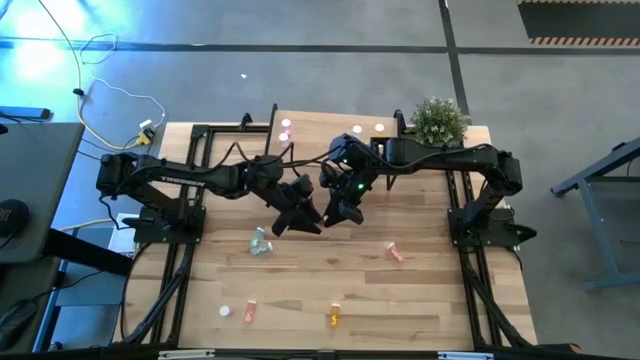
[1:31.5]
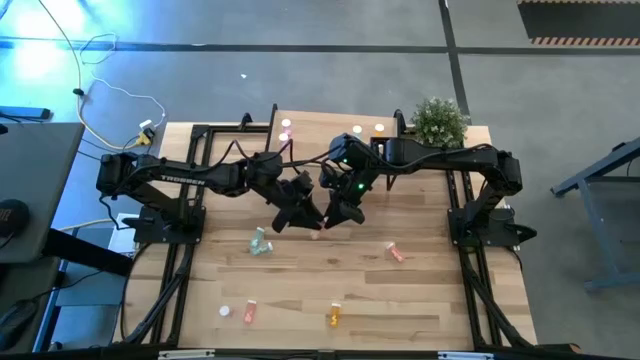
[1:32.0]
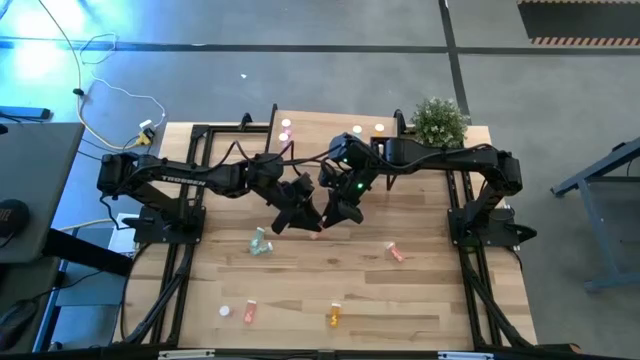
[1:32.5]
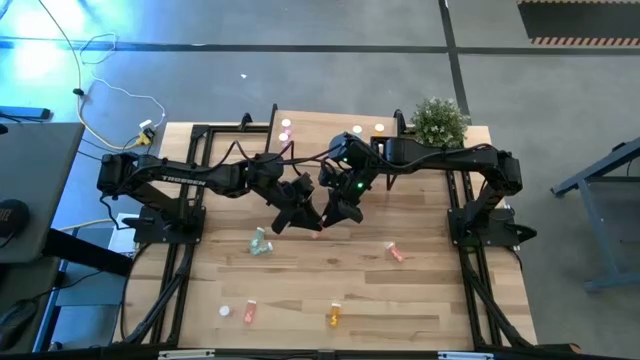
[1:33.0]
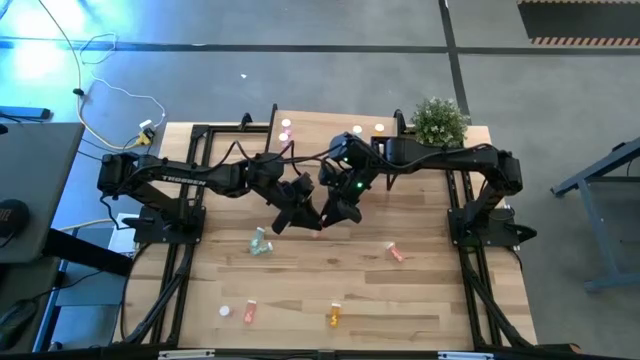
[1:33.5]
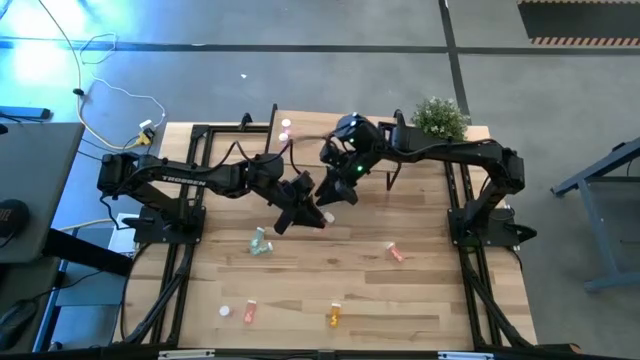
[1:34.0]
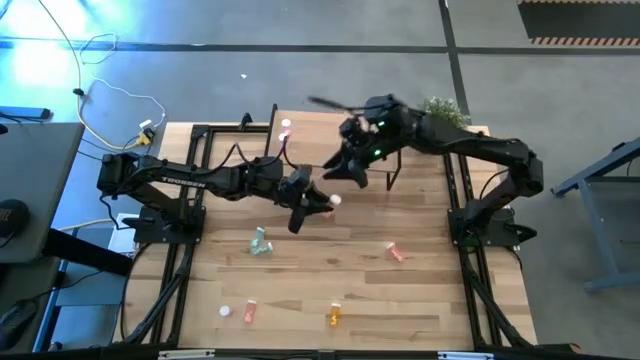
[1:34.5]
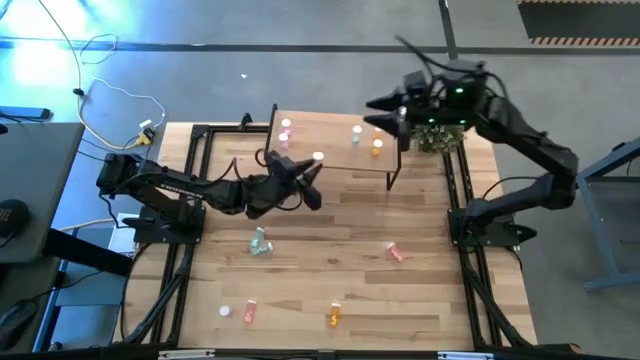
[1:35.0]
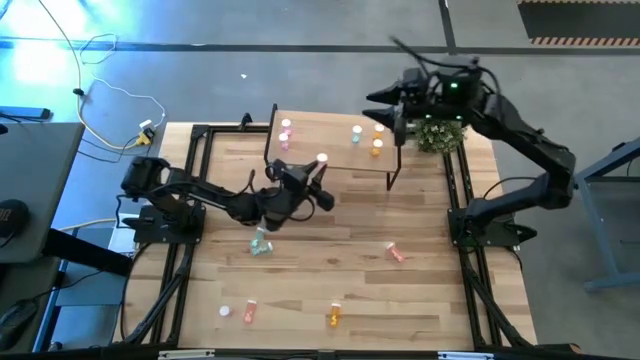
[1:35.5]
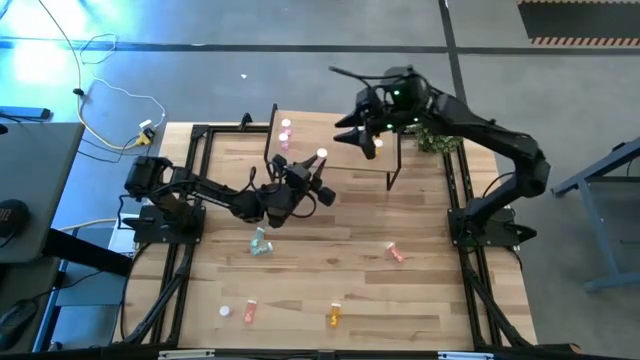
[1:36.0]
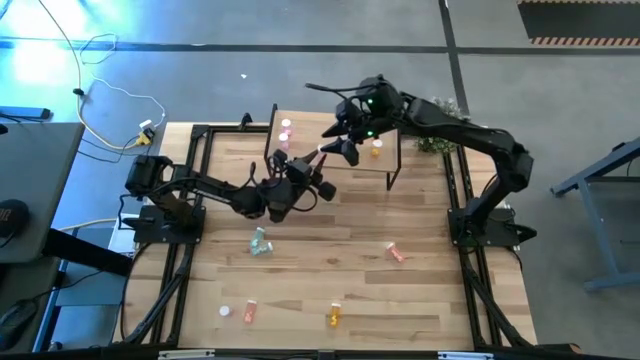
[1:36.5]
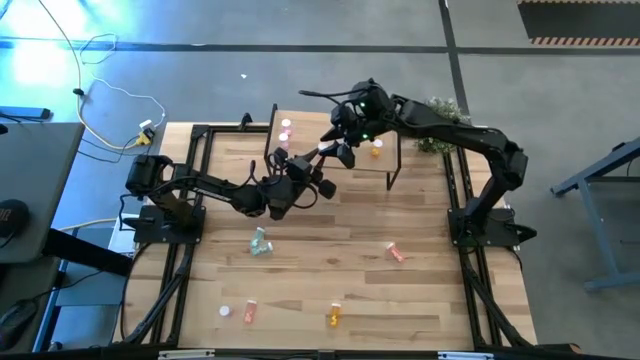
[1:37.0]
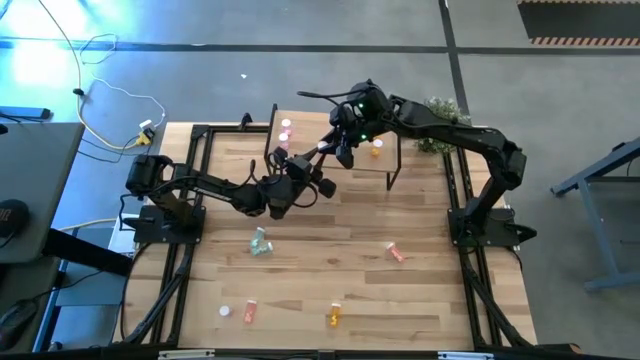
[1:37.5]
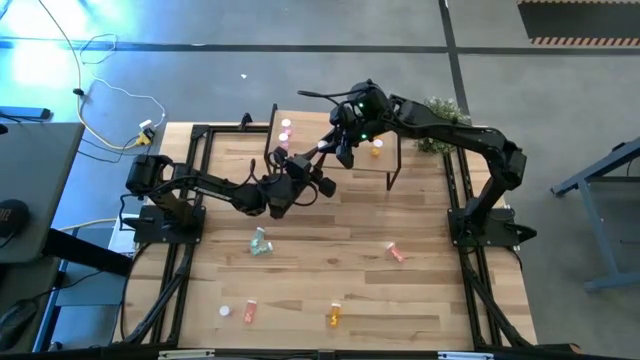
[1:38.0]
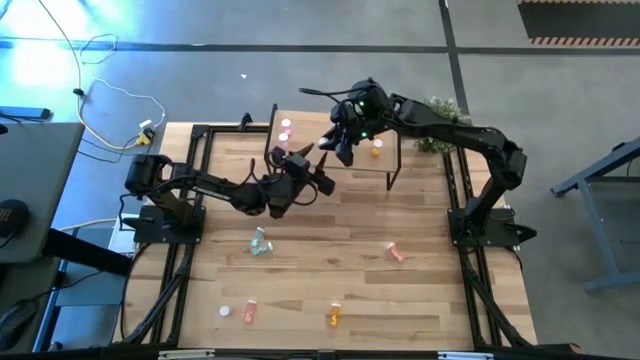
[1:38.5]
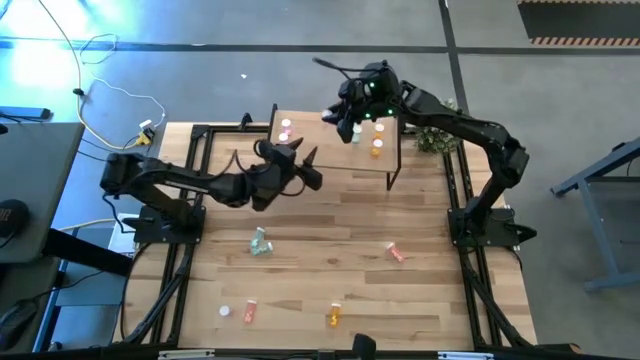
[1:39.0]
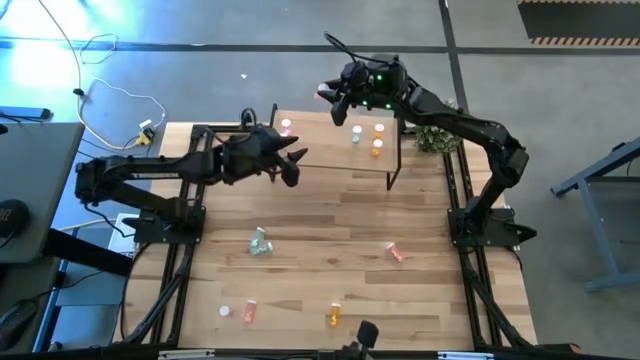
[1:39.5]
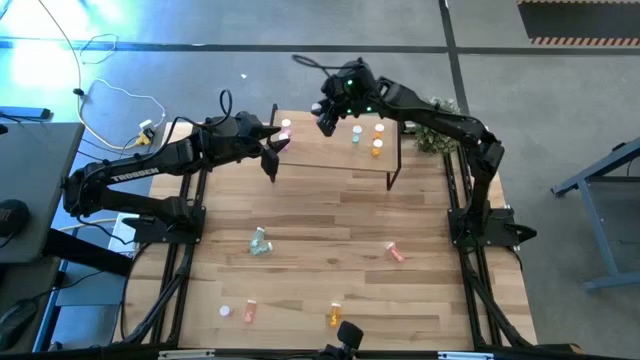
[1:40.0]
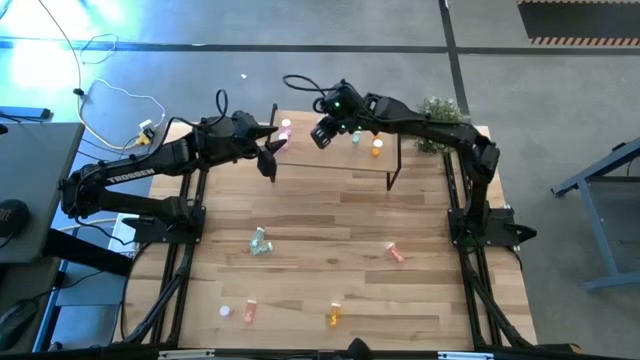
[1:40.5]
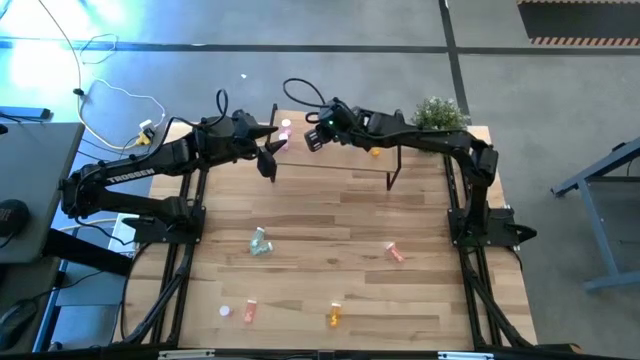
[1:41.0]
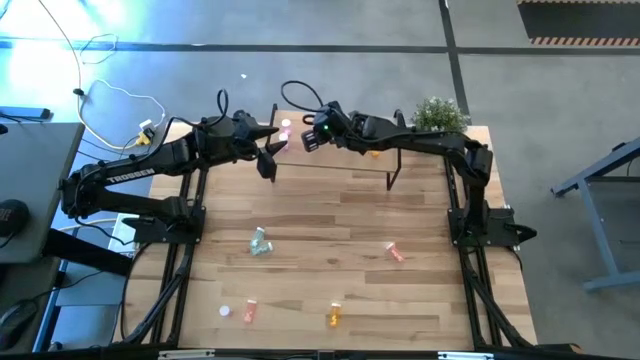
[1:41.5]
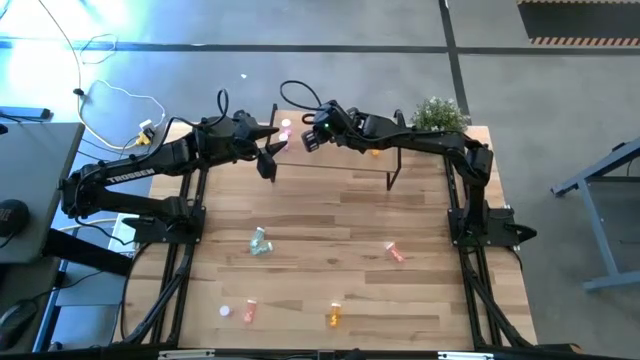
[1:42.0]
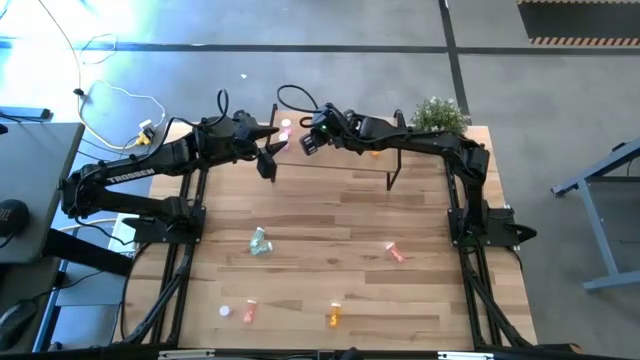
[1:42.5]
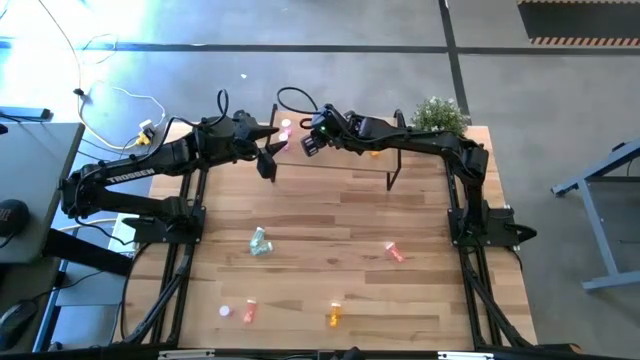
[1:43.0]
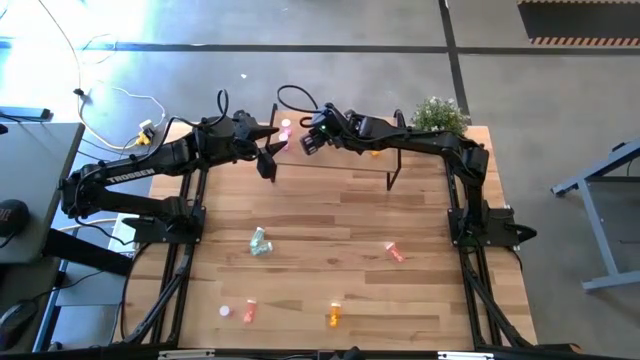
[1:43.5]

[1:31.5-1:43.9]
Task: Pick and place medicine bottles onto shelf by color
Put the bottom right pink pill bottle on the shelf

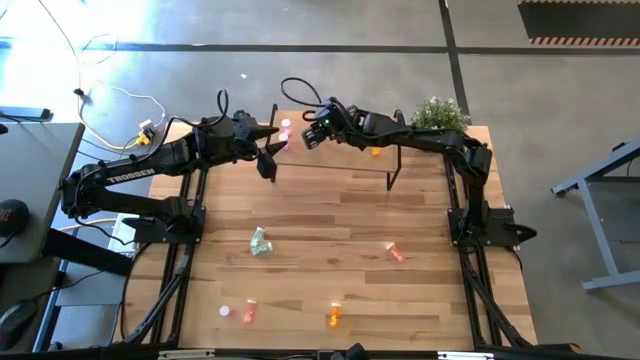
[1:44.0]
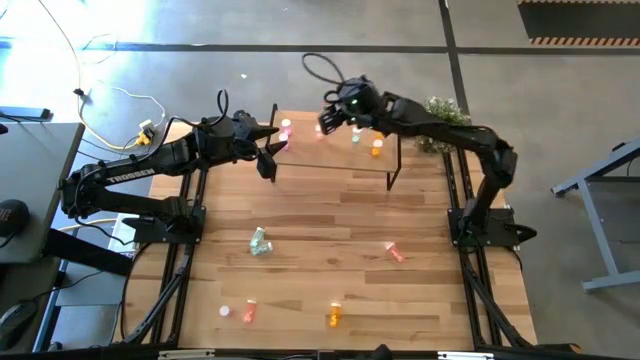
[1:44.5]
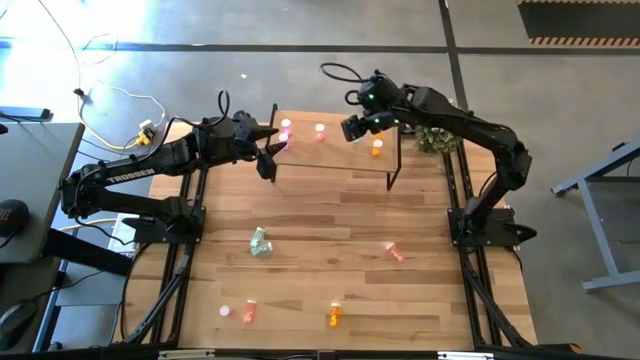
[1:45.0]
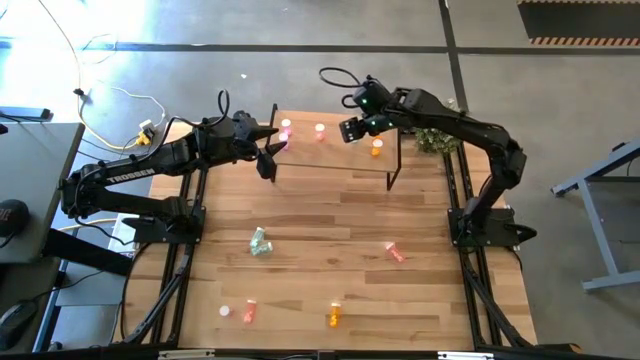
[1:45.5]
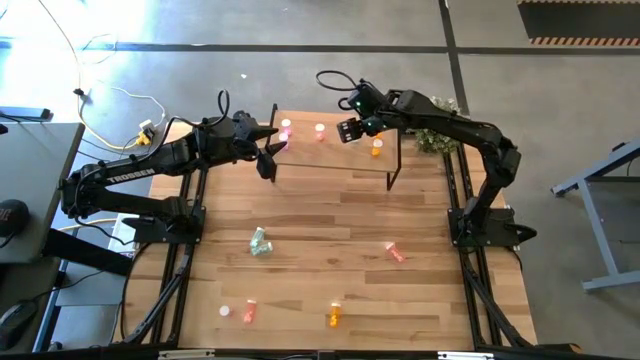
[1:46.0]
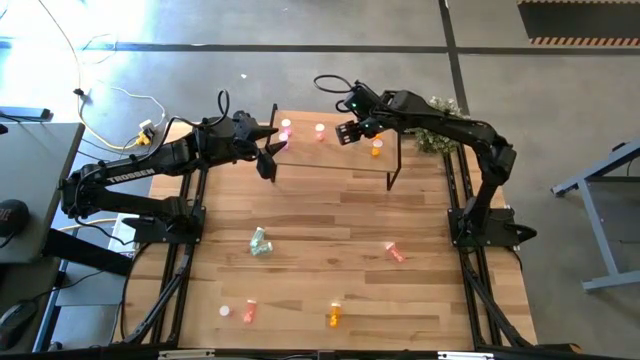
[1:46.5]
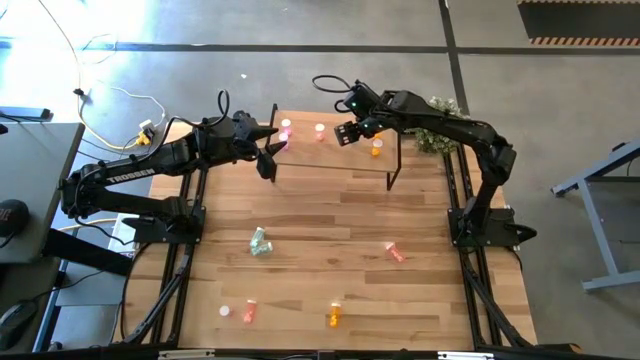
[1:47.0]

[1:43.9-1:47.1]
Adjust the blue pill bottle on the shelf

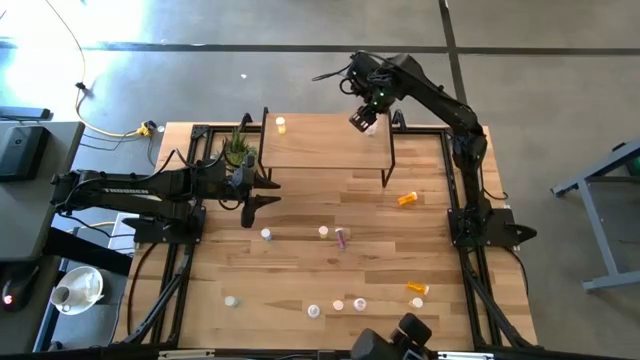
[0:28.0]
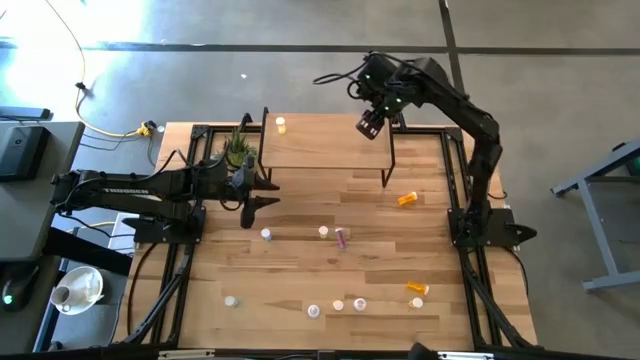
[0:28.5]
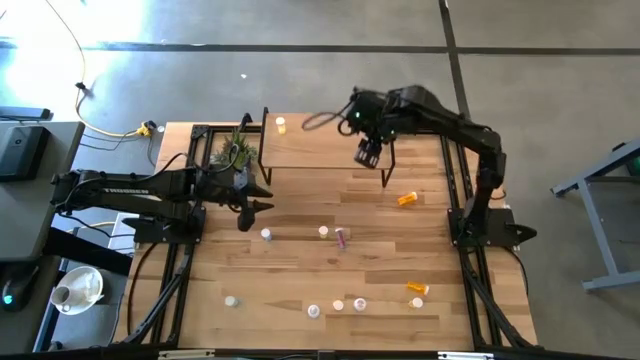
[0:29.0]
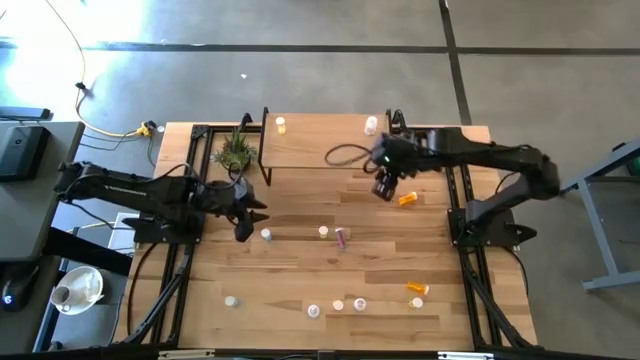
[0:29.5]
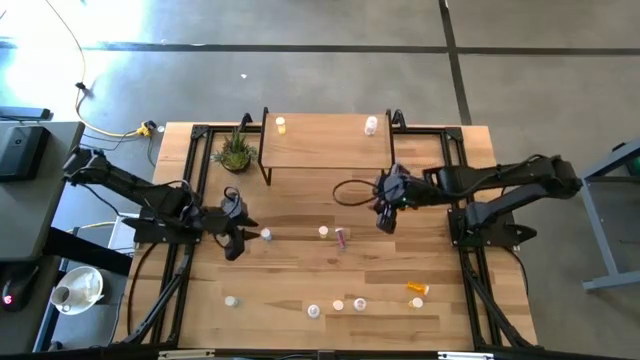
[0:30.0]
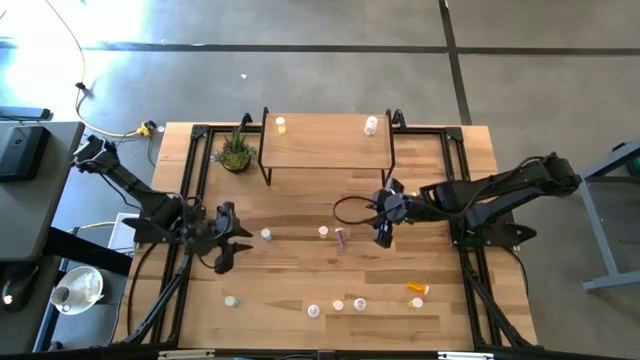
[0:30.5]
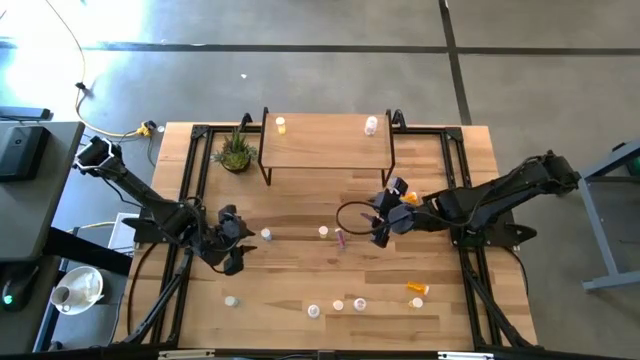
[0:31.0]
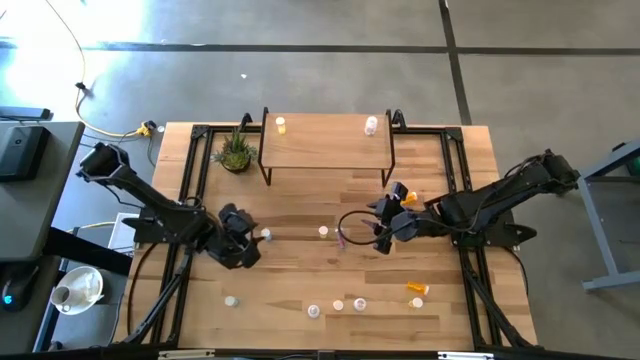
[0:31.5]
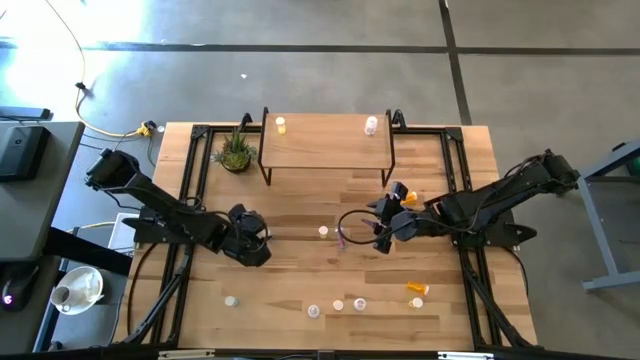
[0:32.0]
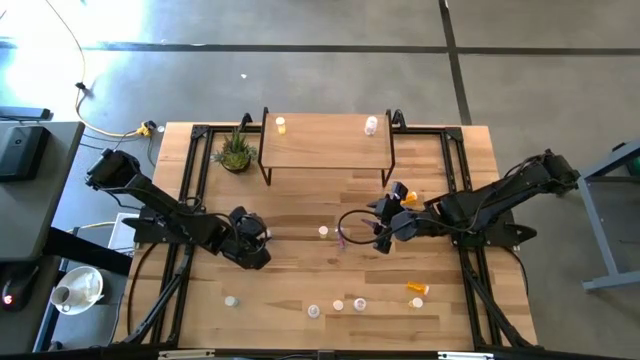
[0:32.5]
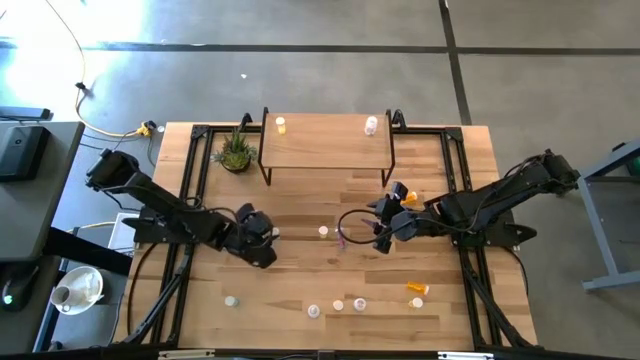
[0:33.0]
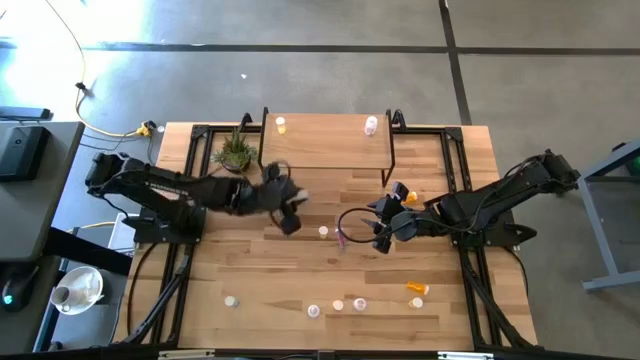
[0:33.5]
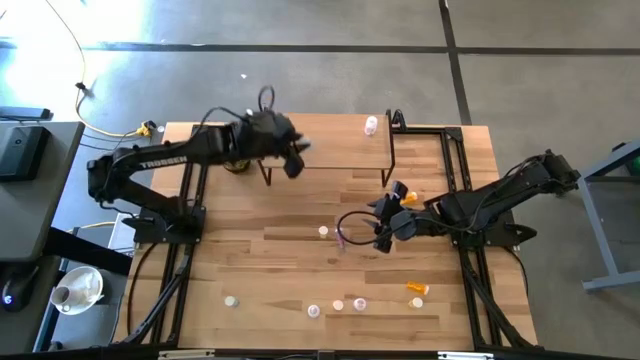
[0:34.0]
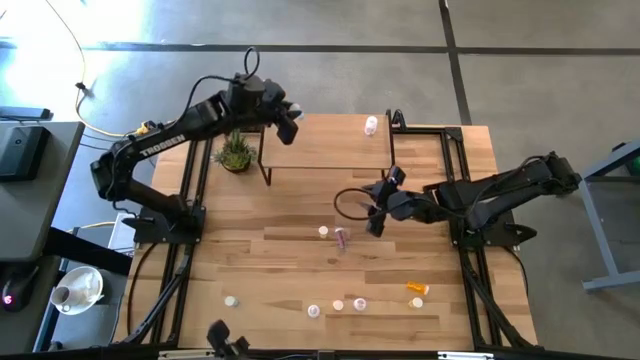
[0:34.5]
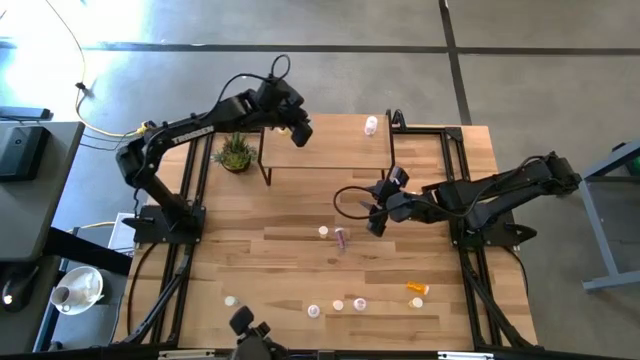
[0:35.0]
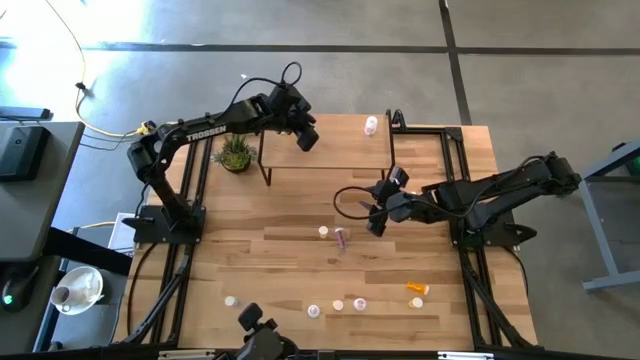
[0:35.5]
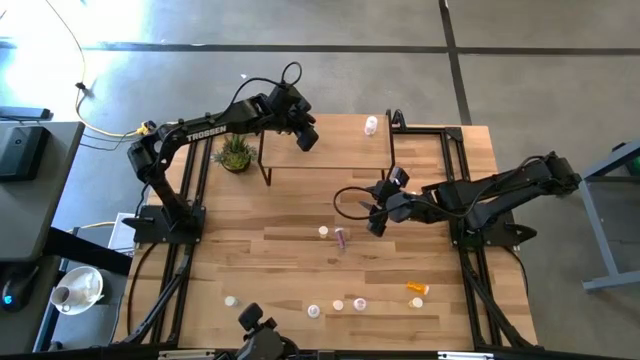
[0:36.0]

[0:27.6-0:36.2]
Task: Pick and place medicine bottles onto shelf by color
Put the top left blue pill bottle on the shelf
